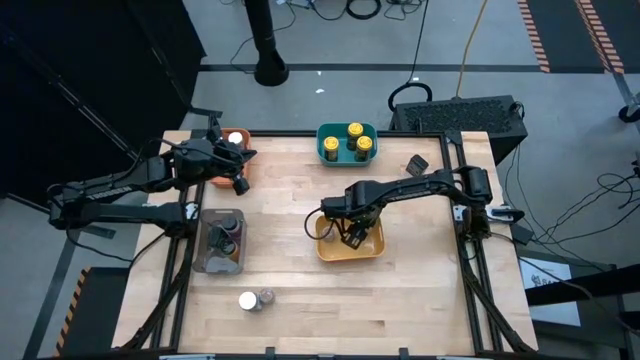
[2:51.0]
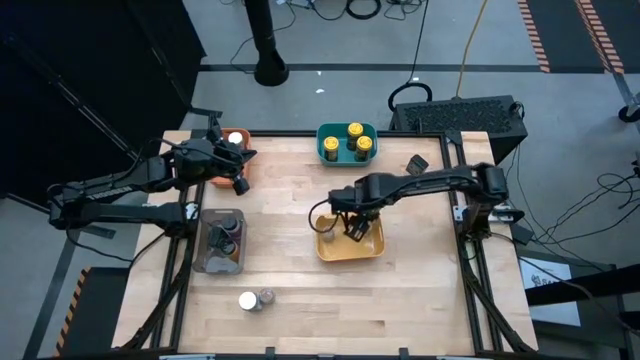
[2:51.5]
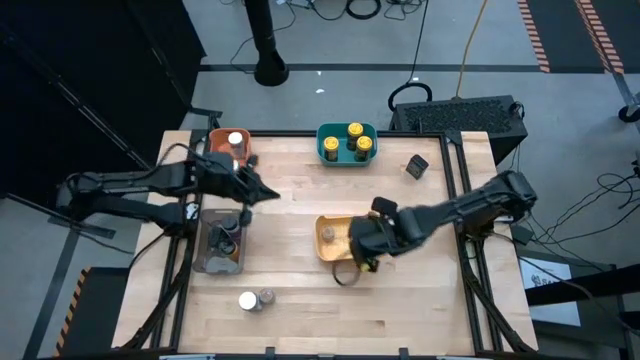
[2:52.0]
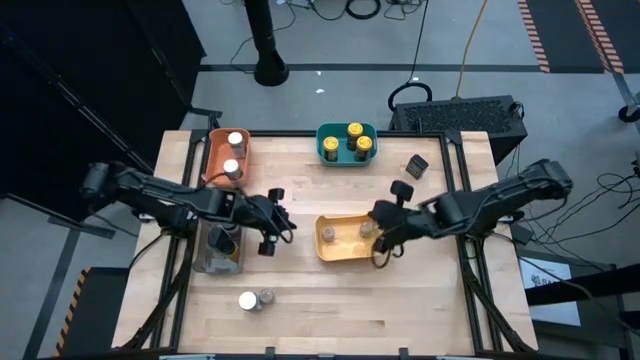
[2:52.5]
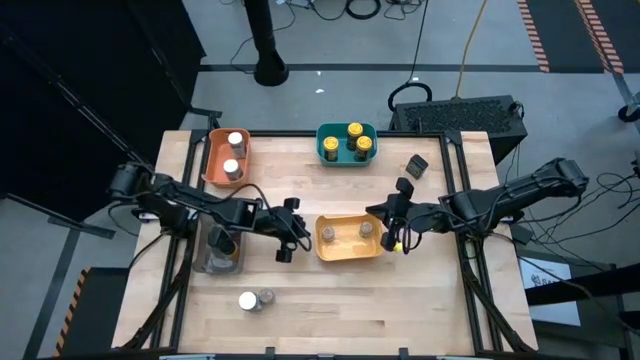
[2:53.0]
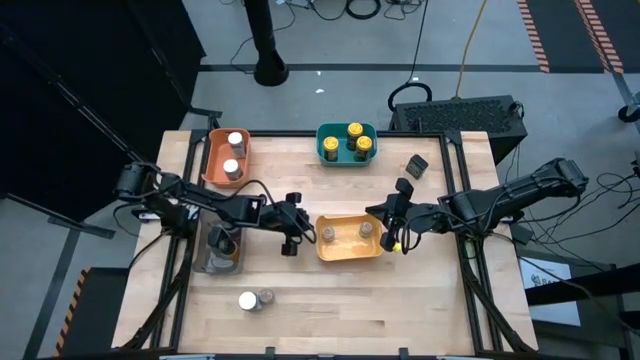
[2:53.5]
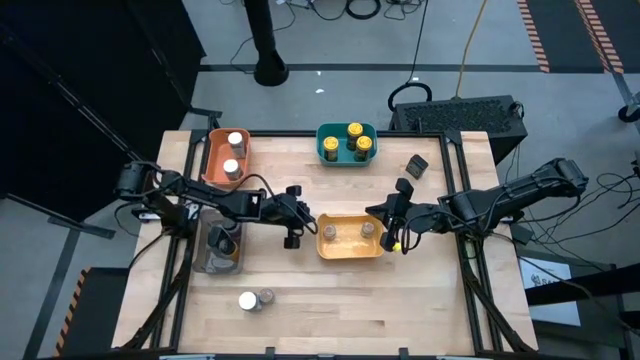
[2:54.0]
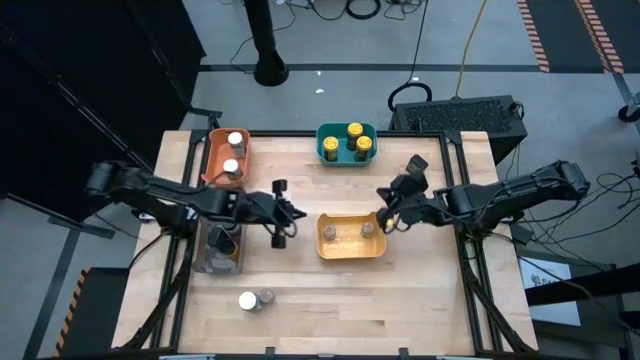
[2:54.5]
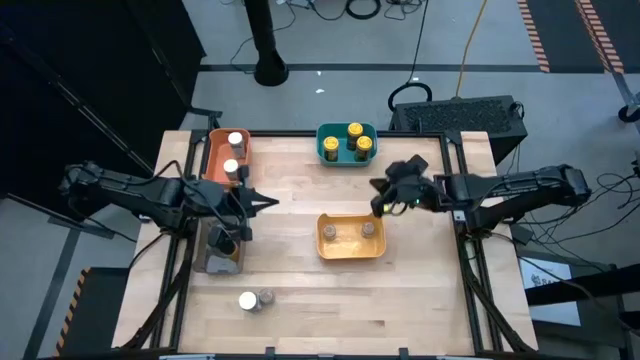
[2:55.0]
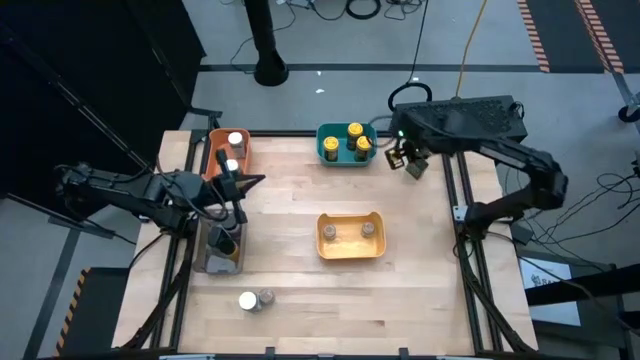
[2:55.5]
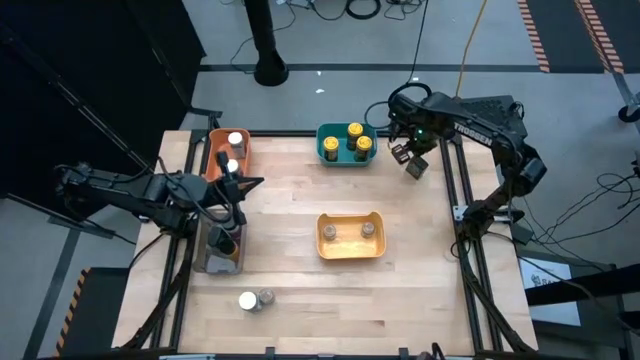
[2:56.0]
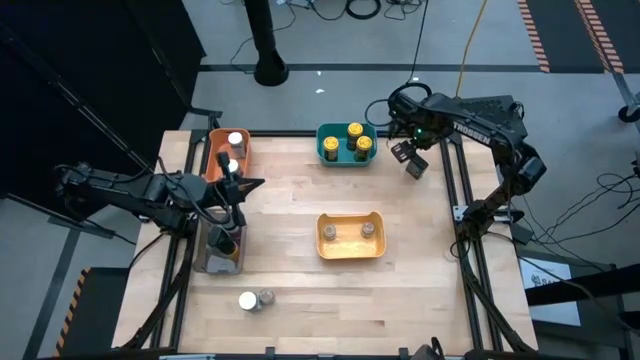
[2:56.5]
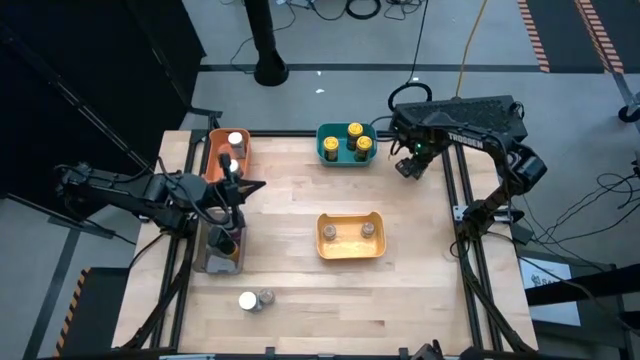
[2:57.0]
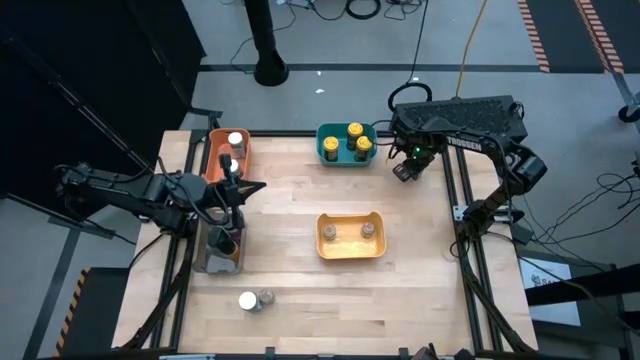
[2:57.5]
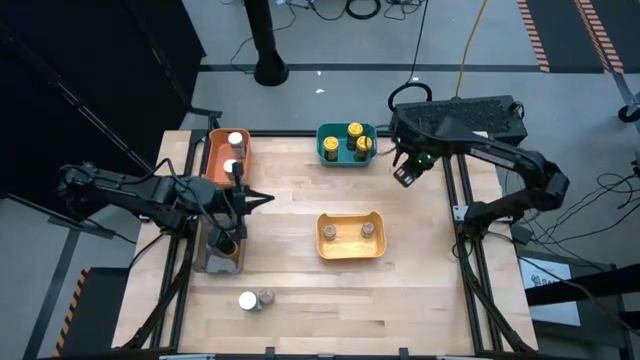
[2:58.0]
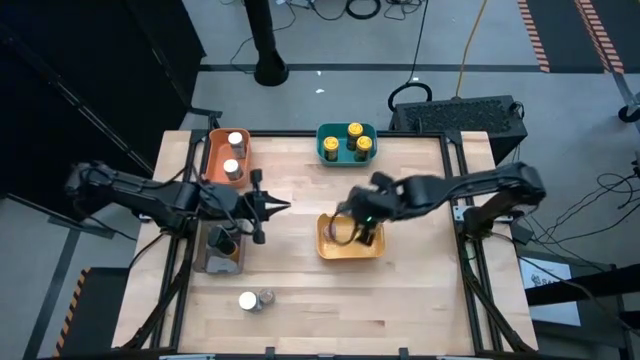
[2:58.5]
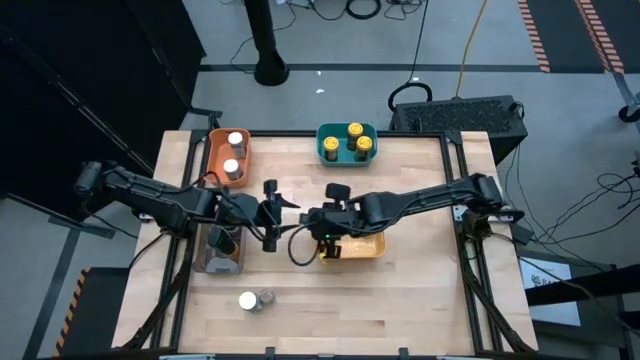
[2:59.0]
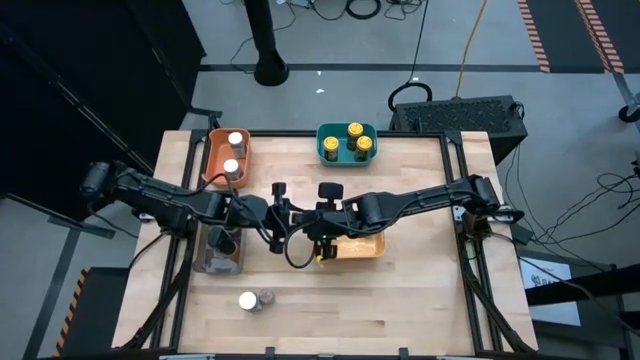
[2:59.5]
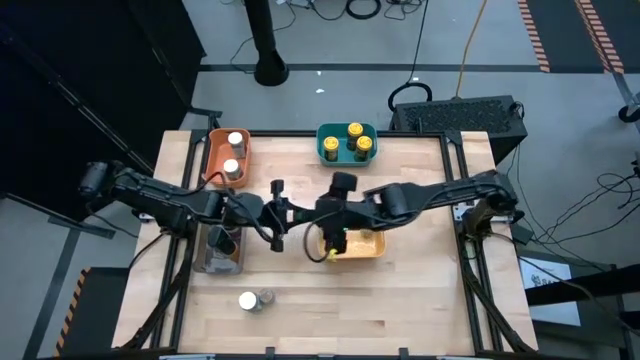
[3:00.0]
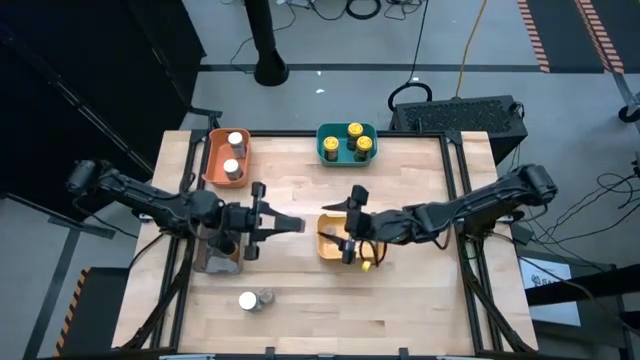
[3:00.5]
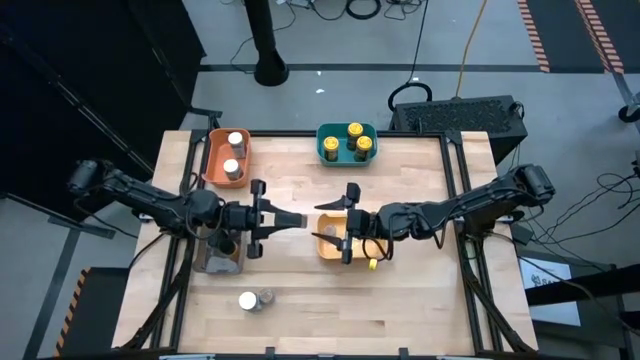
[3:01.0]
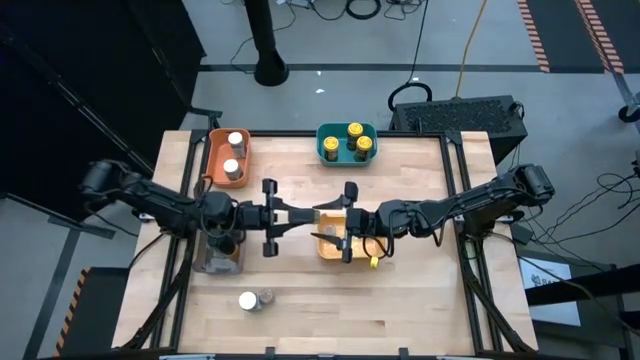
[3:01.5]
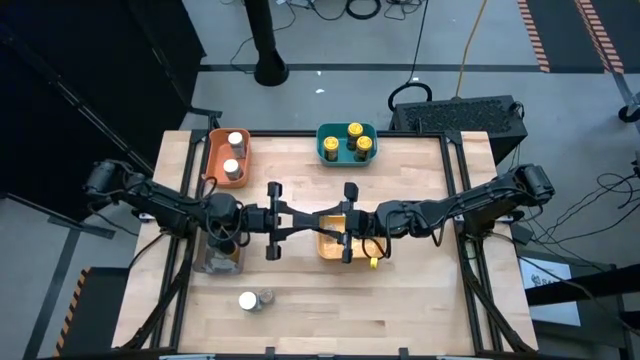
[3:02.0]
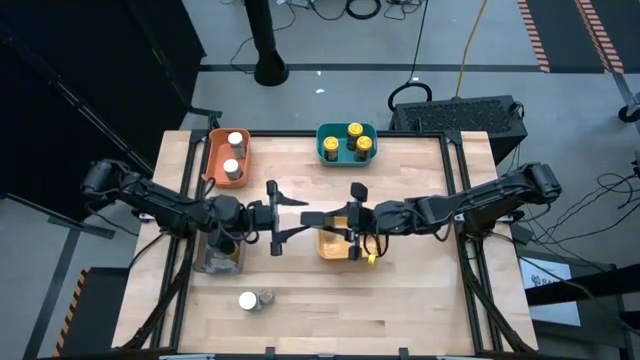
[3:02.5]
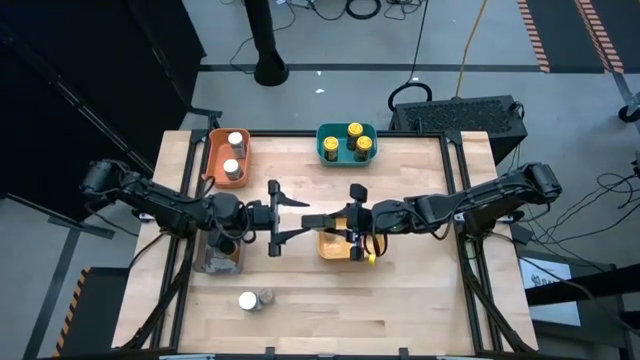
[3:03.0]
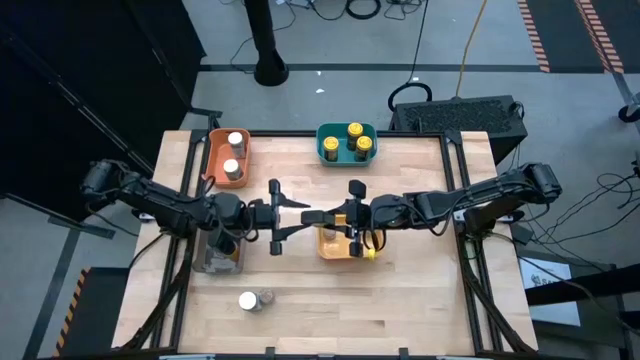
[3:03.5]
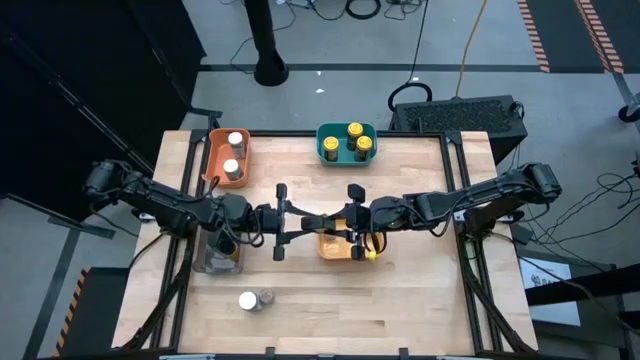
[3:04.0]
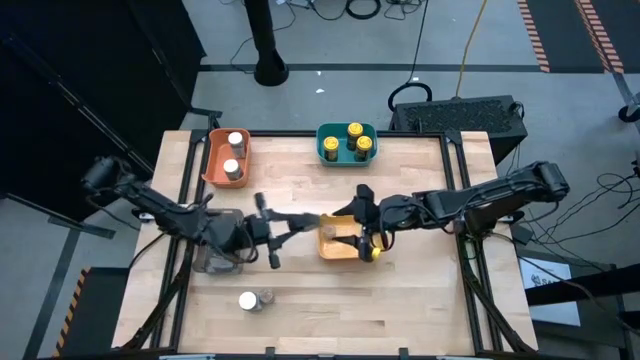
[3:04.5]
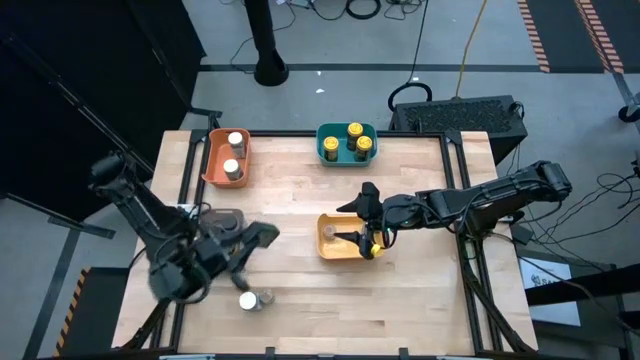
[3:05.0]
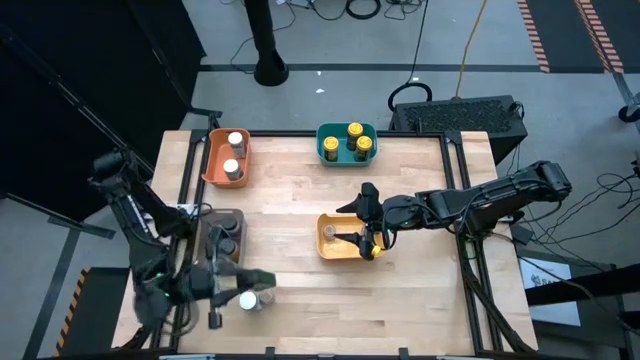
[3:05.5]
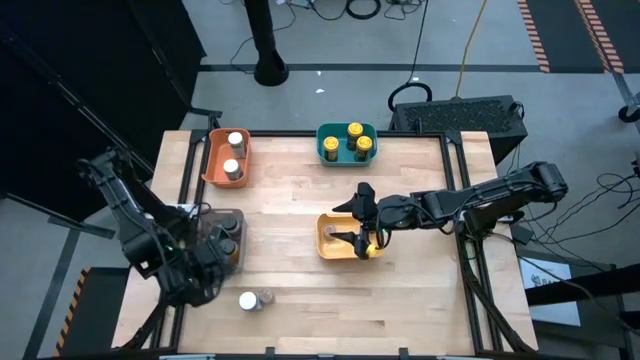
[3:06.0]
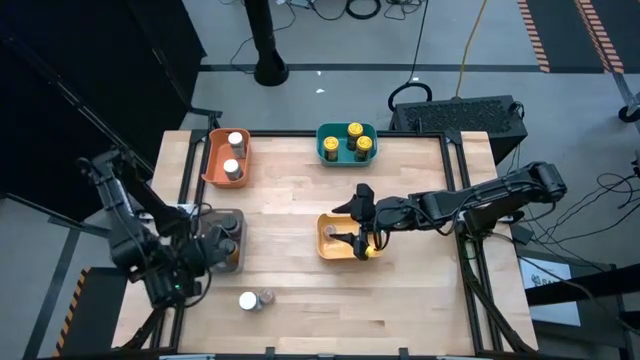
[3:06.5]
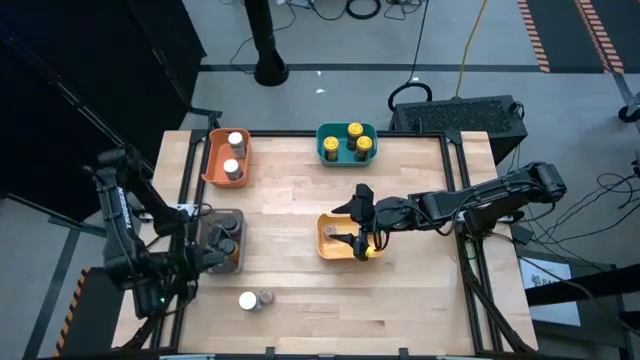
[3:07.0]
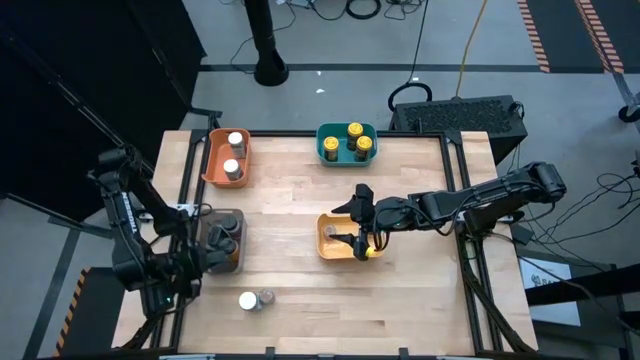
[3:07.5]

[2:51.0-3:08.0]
Task: Sort spices by type
Put the black seasoning can into the black bin

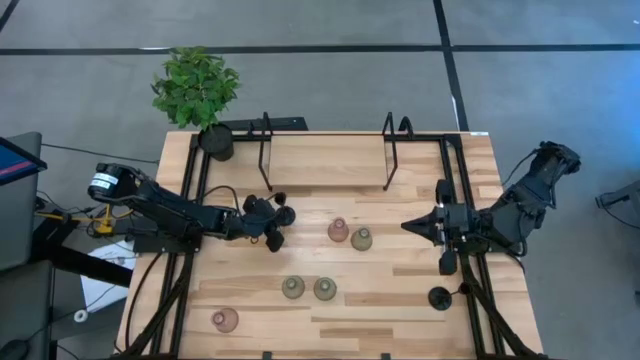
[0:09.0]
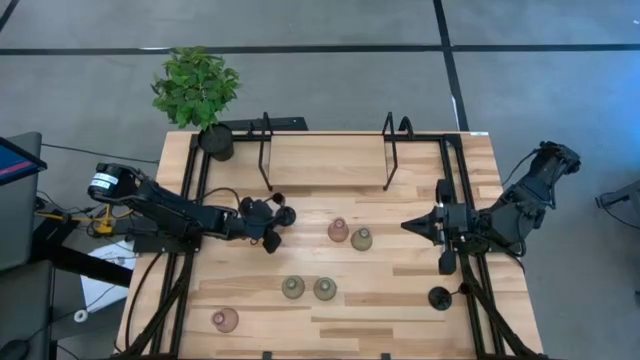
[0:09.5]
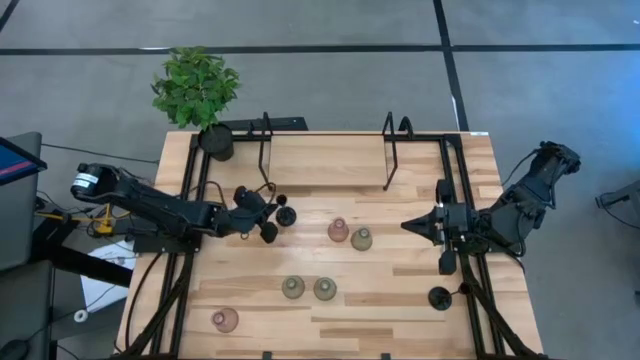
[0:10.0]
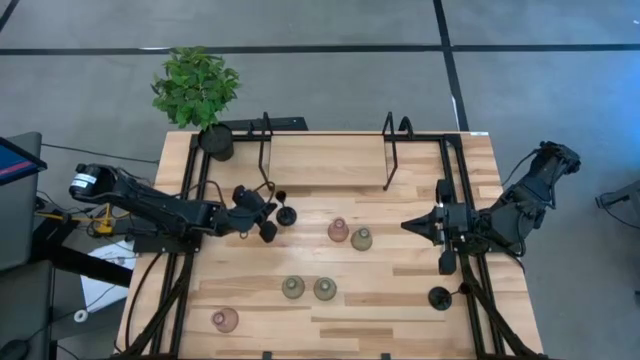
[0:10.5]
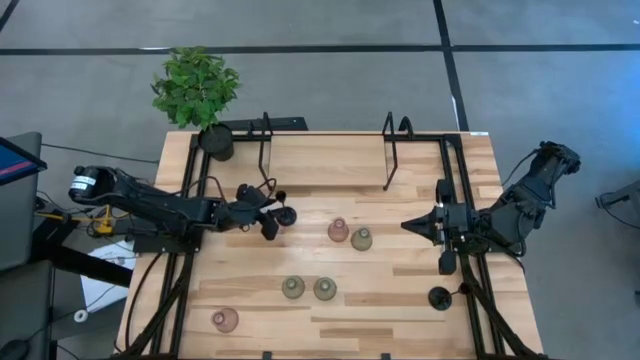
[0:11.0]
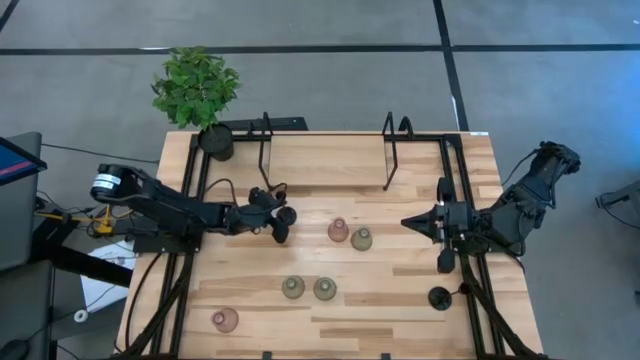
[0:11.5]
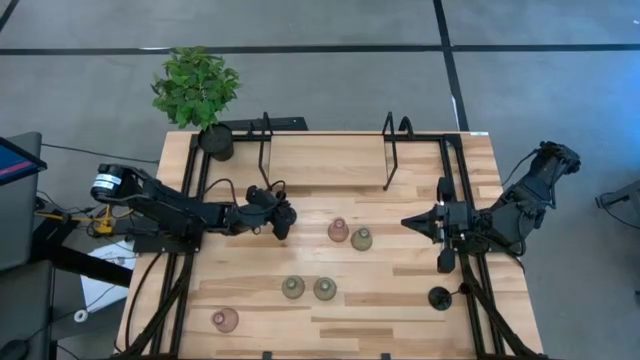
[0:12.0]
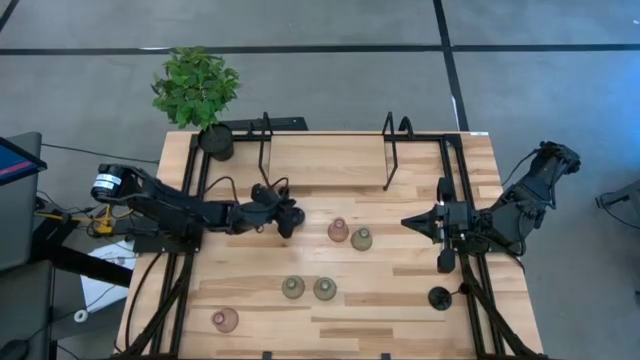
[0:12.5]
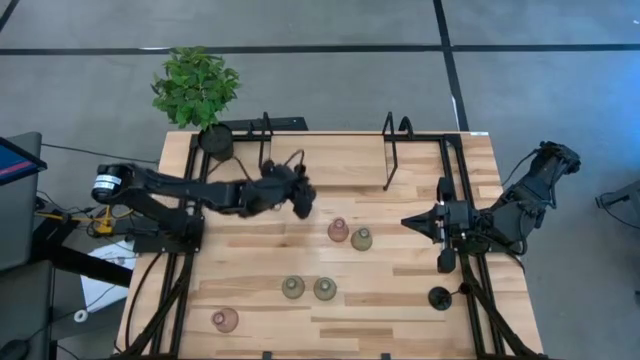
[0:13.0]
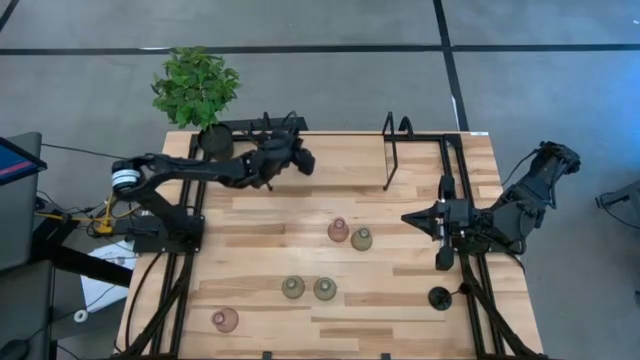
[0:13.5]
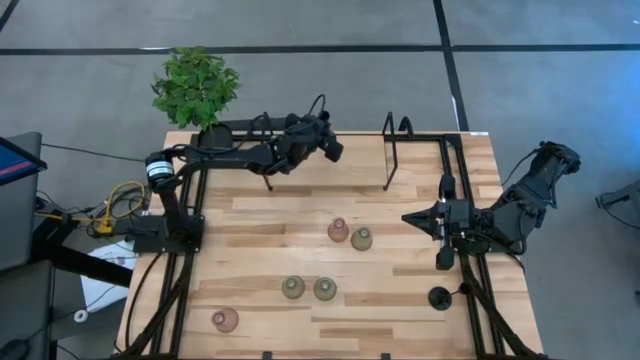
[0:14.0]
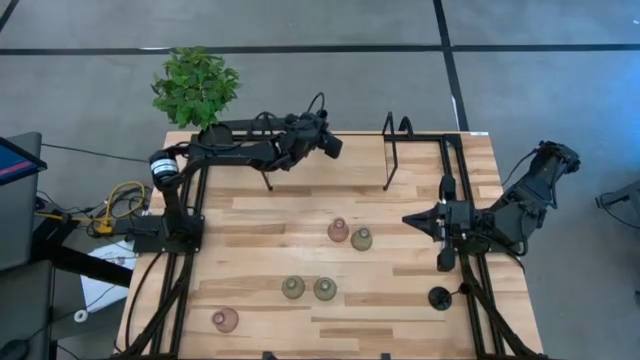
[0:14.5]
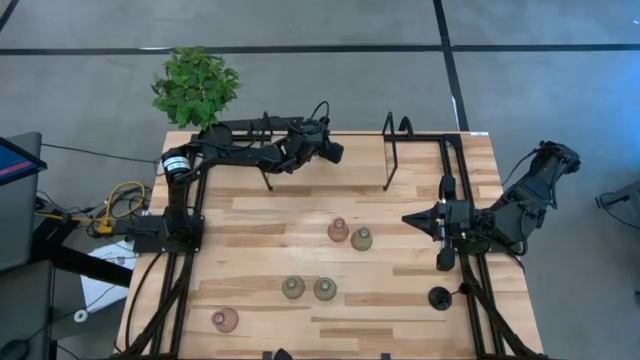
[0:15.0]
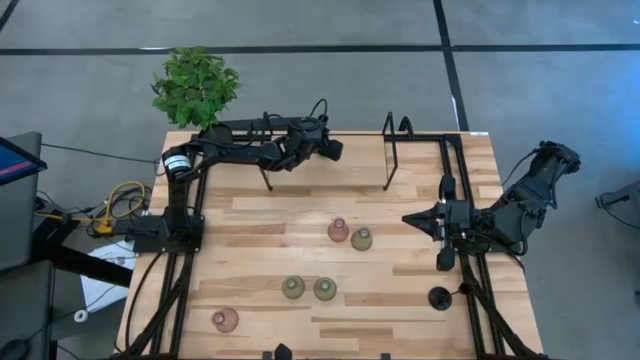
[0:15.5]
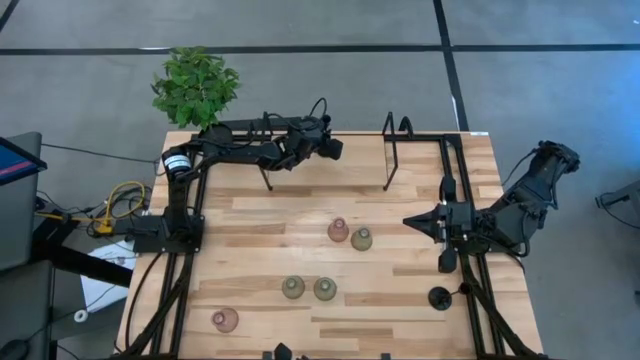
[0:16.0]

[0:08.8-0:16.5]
Task: Pick & Place candle stick holders
Put the black candle holder on the shelf
